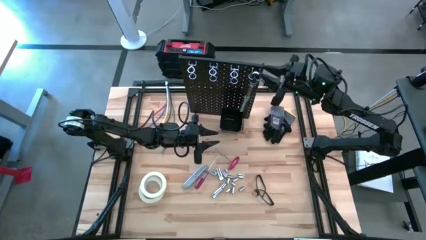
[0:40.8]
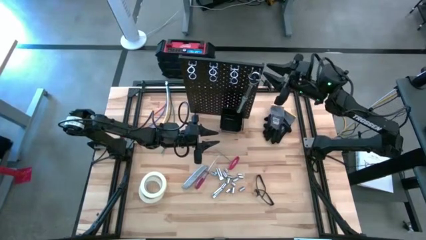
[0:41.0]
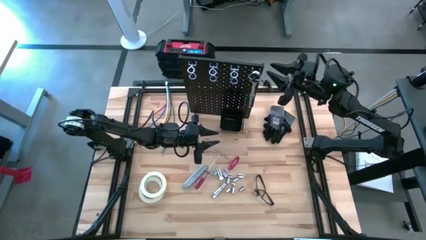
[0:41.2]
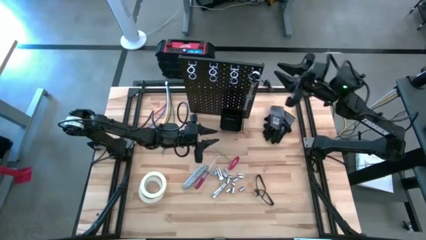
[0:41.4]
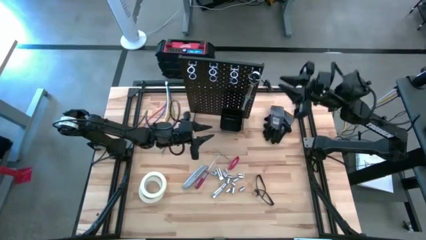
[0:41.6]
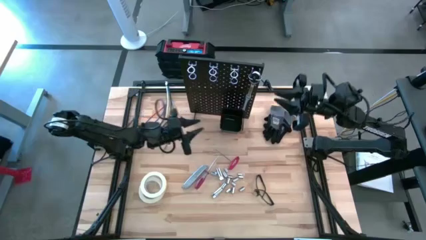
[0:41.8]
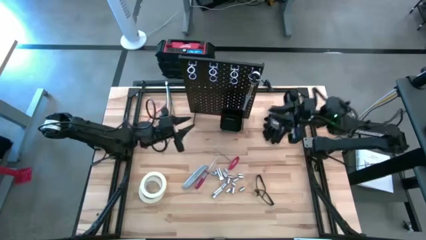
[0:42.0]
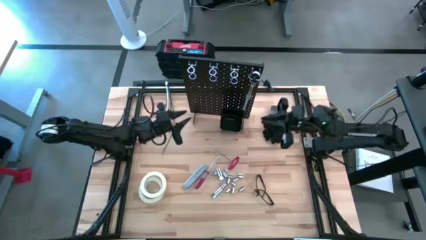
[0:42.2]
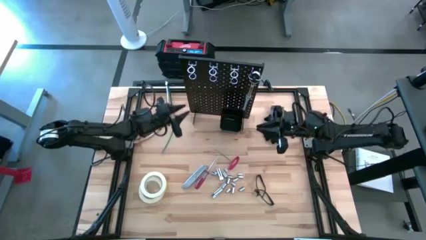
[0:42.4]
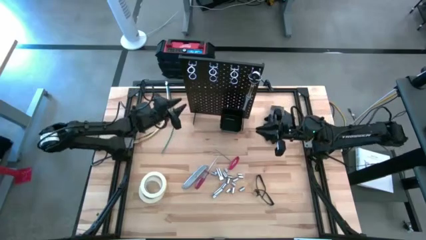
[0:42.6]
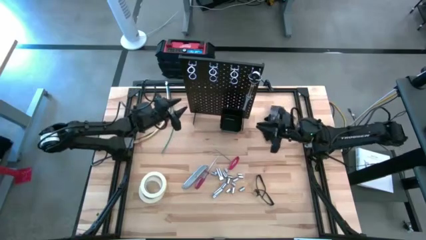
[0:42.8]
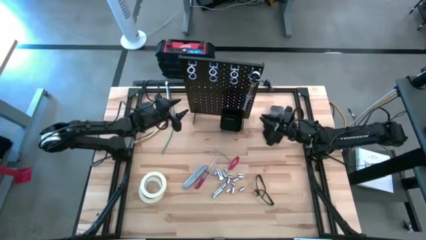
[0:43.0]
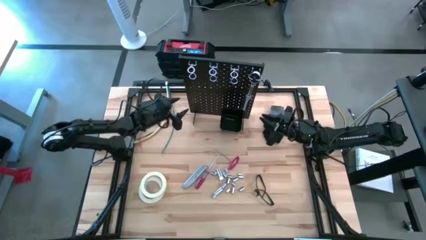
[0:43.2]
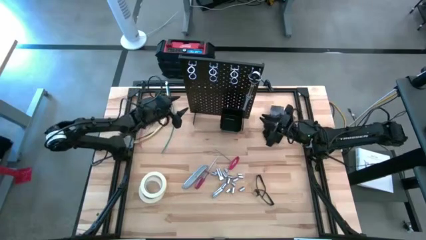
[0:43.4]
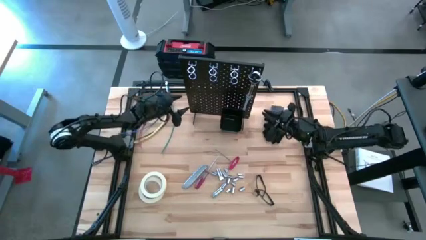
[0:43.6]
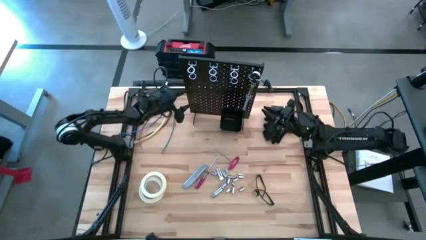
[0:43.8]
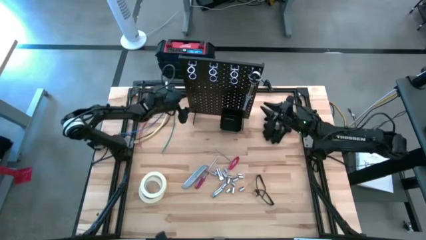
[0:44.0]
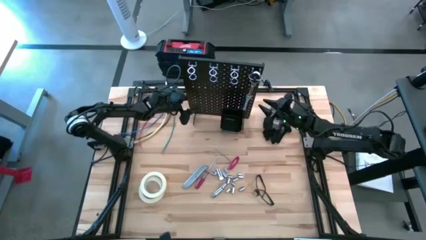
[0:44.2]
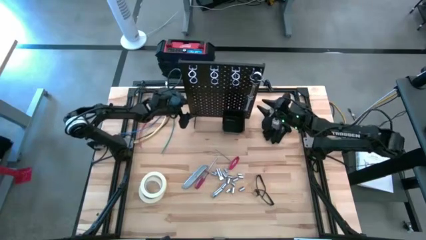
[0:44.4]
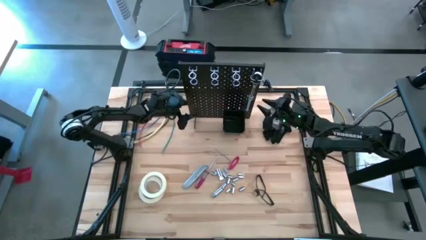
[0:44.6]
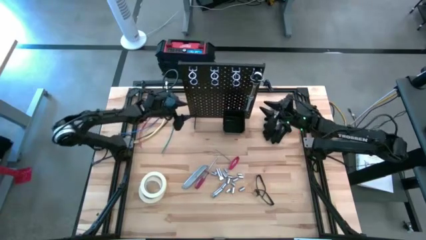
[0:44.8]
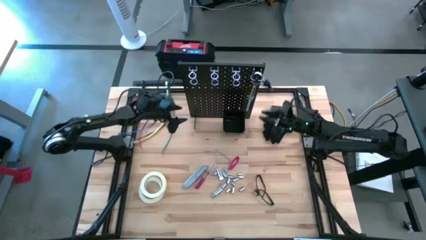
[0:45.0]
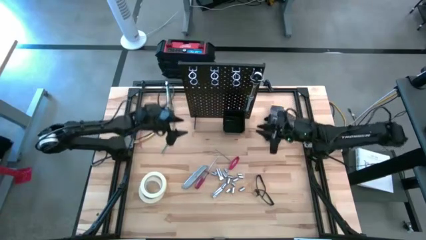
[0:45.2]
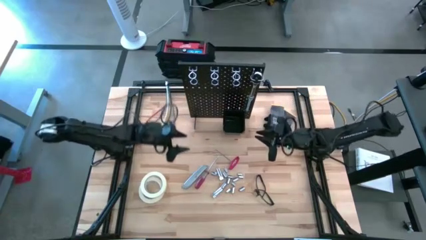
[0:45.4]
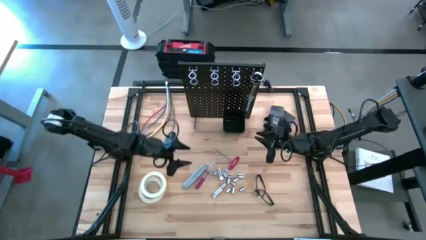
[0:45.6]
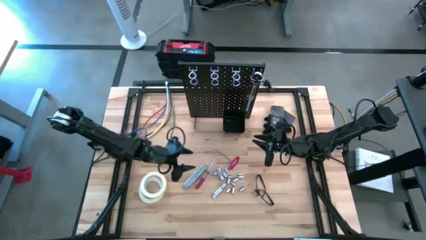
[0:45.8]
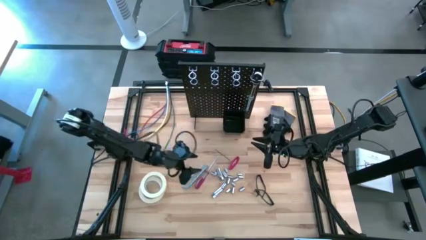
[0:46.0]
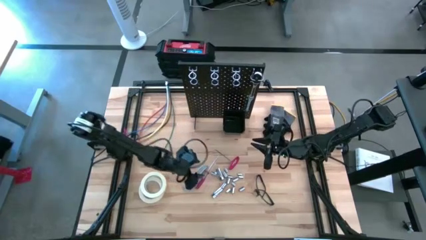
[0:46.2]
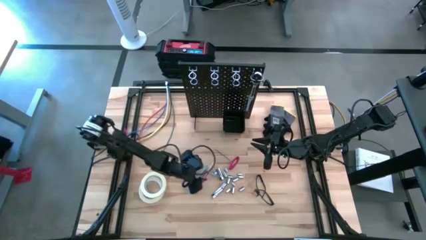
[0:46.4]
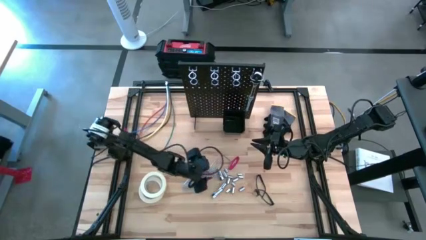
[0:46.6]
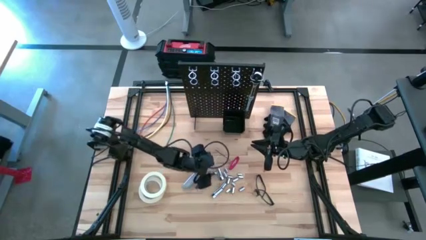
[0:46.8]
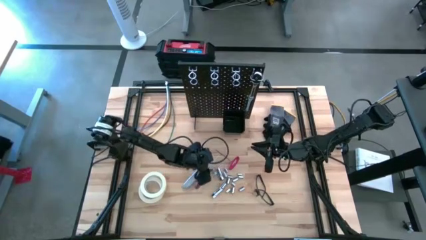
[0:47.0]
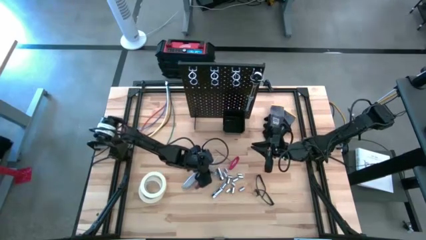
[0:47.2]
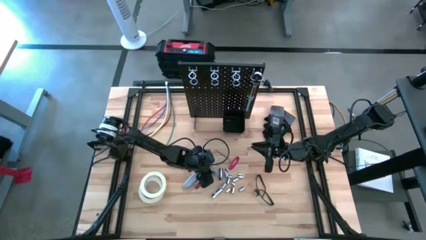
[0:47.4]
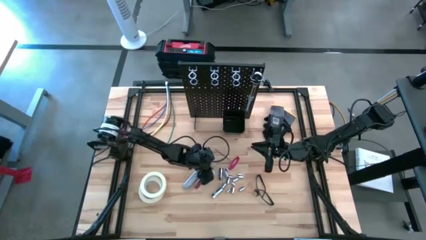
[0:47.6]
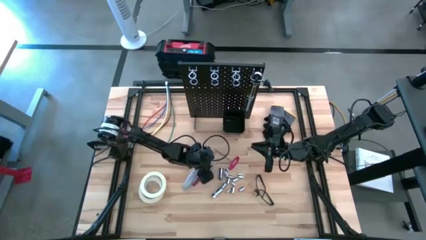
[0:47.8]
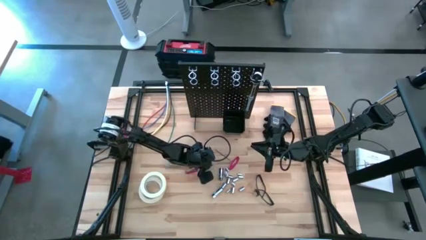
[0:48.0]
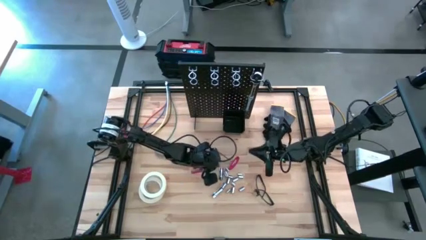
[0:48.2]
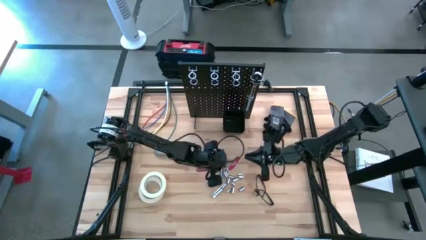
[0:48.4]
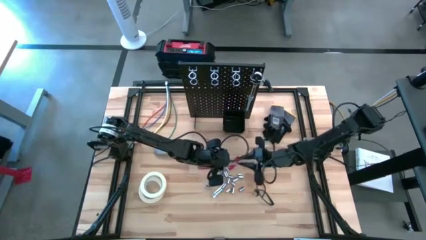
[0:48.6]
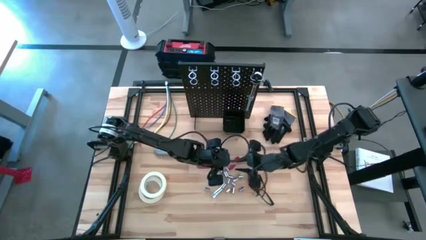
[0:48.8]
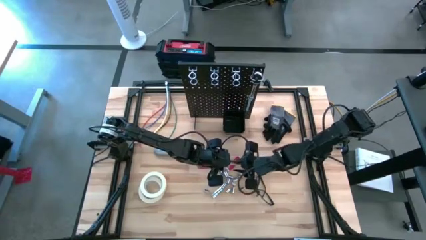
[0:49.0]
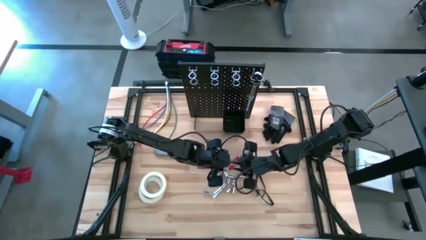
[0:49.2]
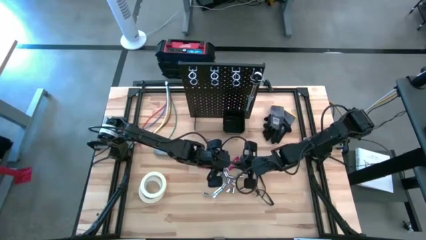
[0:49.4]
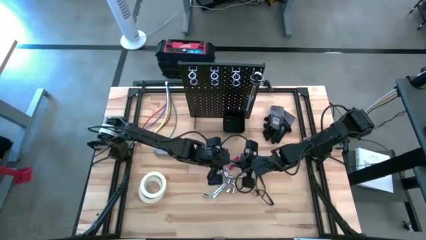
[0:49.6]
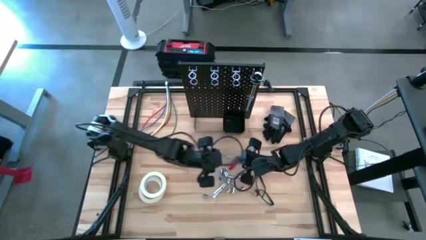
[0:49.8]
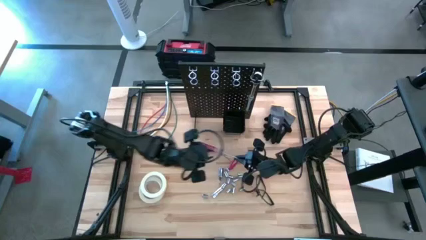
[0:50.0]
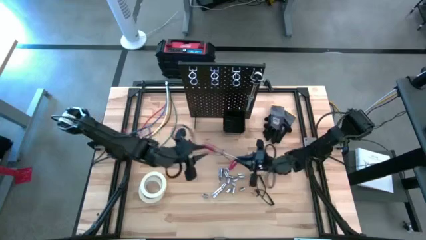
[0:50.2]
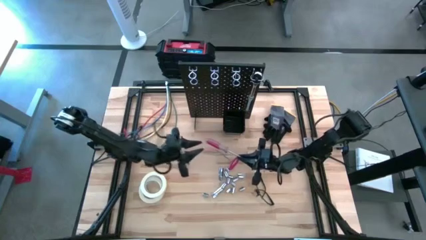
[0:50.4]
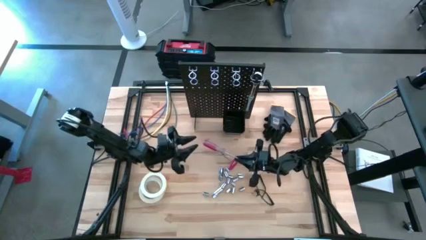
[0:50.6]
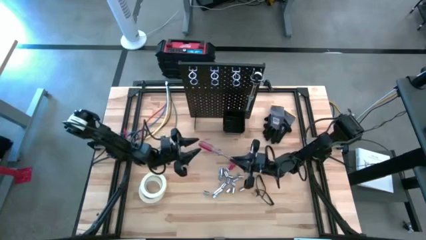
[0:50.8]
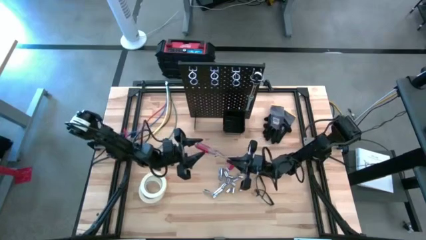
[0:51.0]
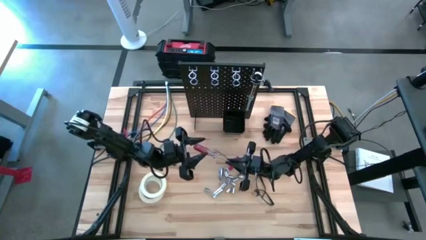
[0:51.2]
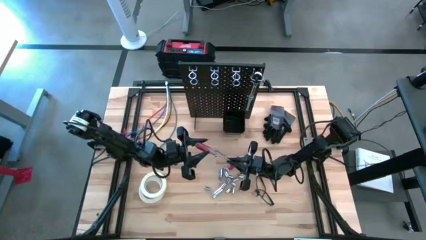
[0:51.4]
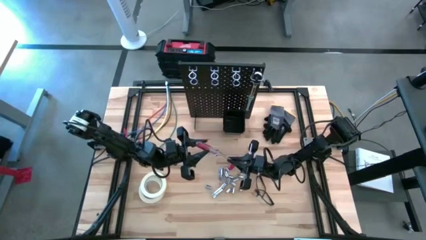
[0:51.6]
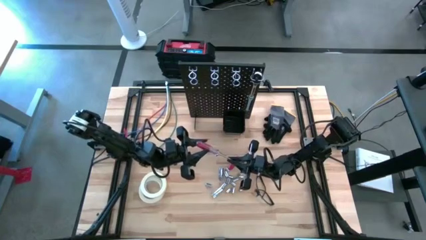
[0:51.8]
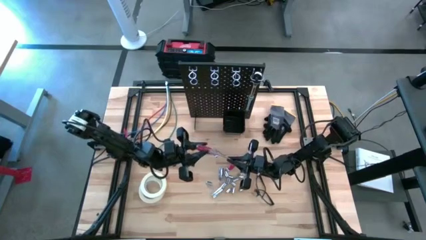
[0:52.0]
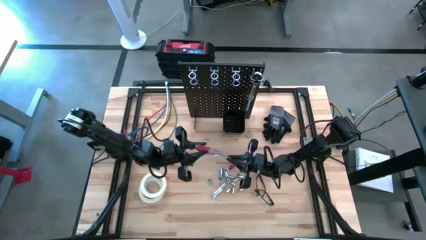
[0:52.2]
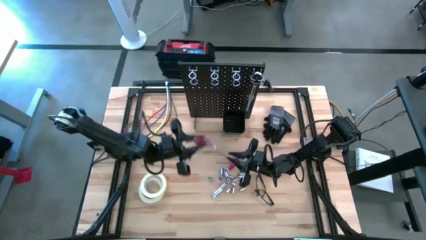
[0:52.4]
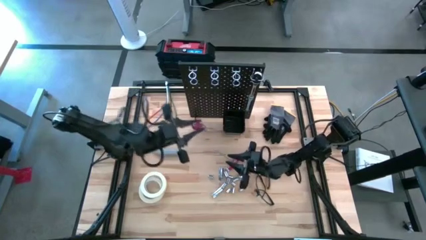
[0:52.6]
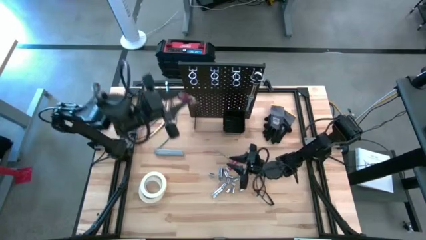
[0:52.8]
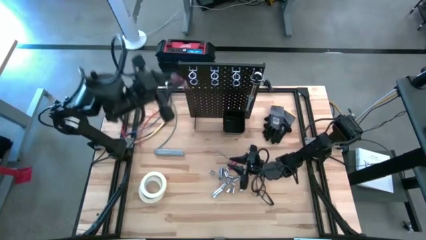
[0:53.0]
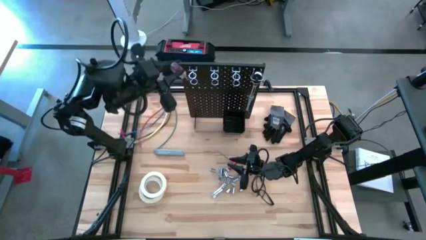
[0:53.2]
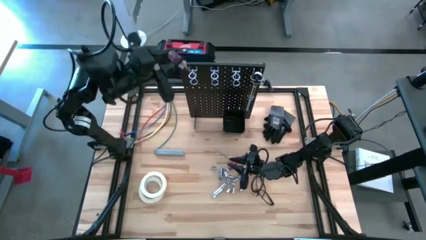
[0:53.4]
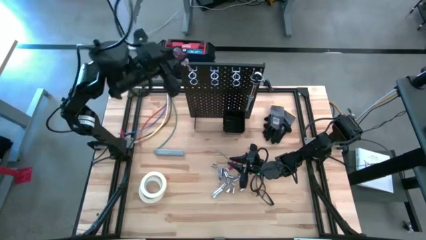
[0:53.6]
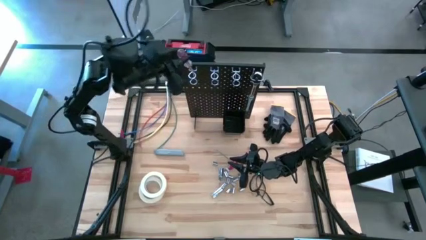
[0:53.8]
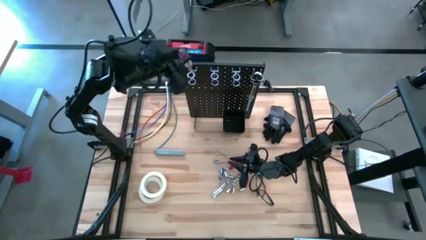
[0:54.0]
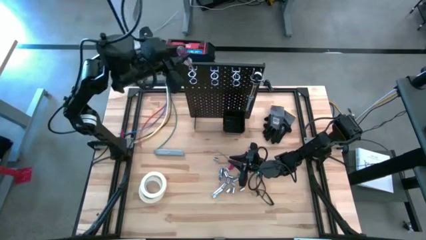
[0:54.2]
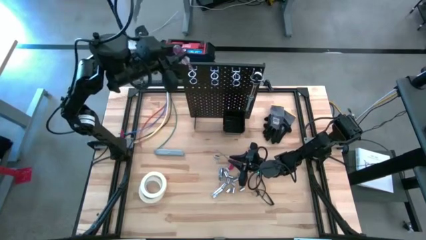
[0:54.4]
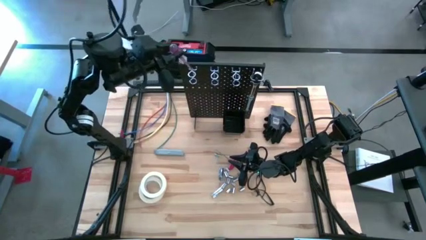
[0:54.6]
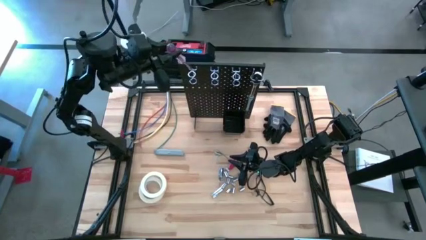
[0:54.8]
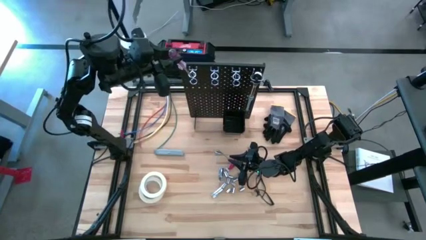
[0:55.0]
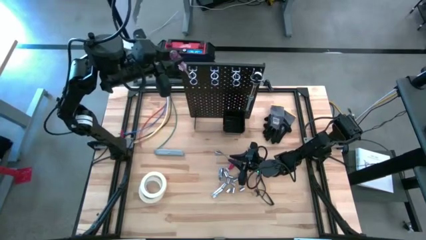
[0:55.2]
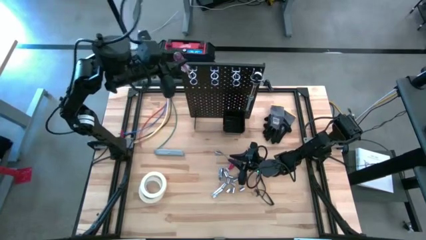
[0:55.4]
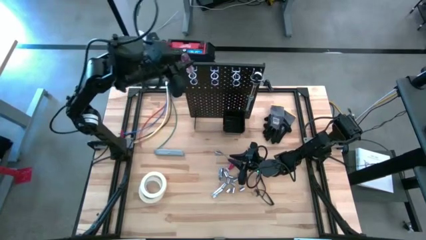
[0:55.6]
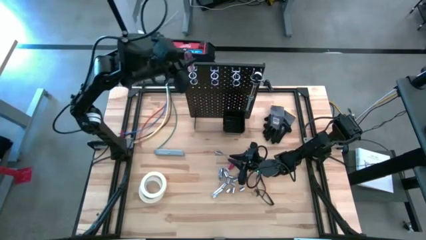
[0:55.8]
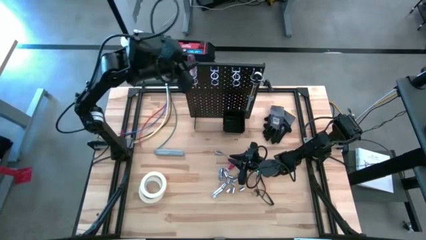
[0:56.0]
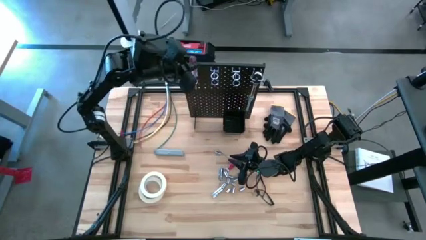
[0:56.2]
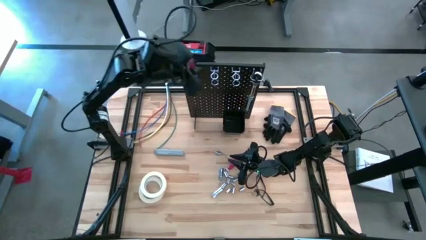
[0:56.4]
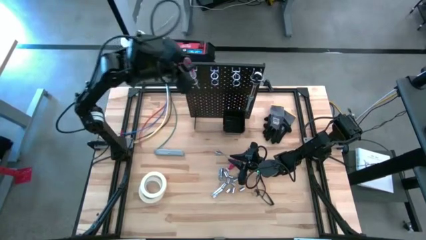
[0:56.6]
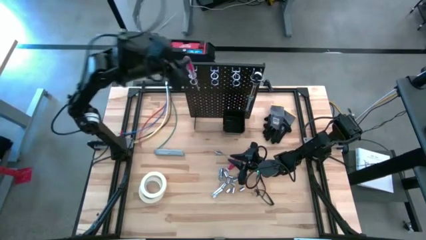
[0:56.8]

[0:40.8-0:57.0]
Task: Hang tools onto peg board
Hang the red screwdriver on the peg board
